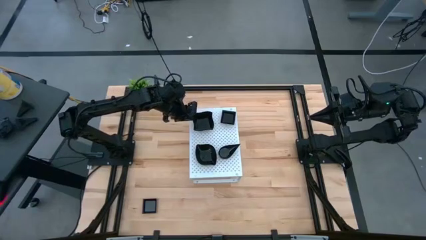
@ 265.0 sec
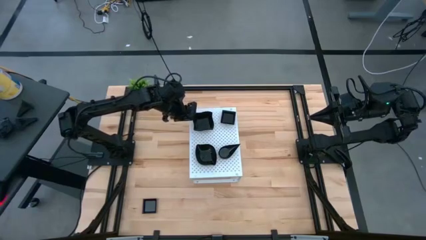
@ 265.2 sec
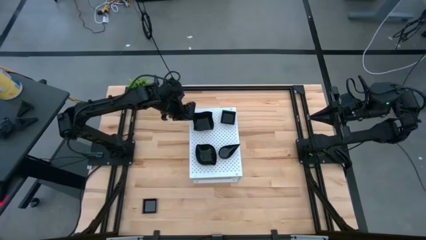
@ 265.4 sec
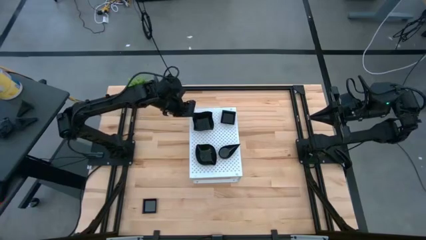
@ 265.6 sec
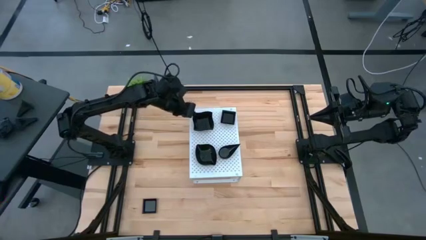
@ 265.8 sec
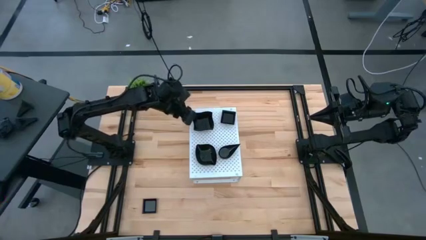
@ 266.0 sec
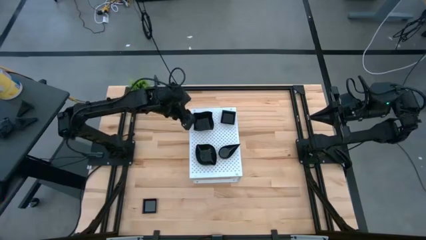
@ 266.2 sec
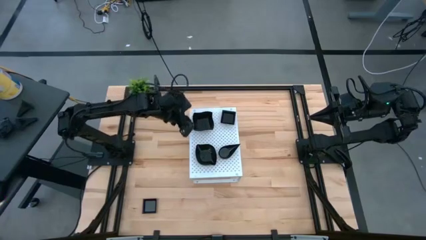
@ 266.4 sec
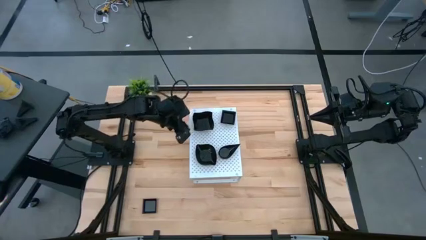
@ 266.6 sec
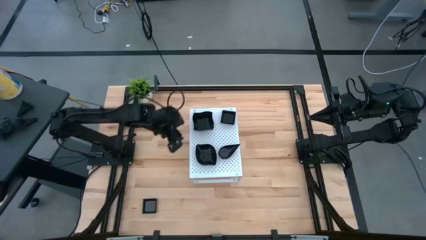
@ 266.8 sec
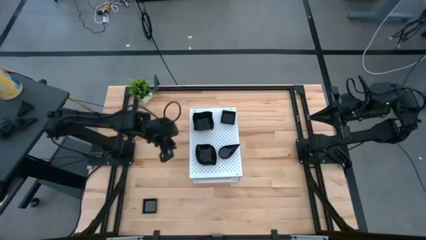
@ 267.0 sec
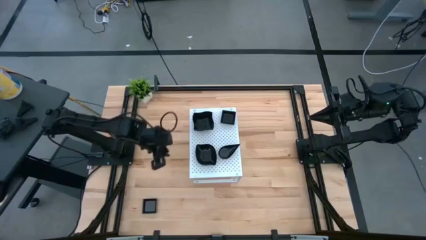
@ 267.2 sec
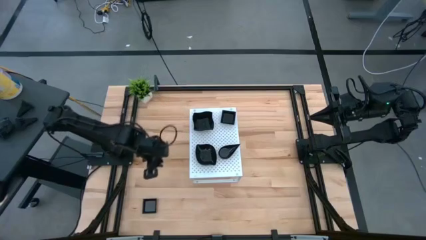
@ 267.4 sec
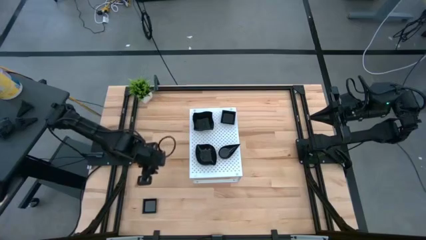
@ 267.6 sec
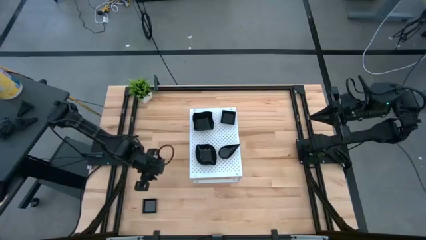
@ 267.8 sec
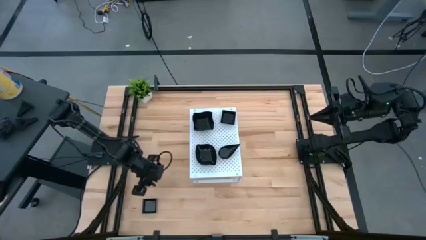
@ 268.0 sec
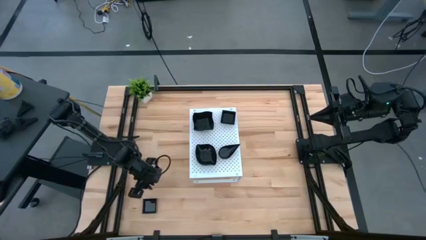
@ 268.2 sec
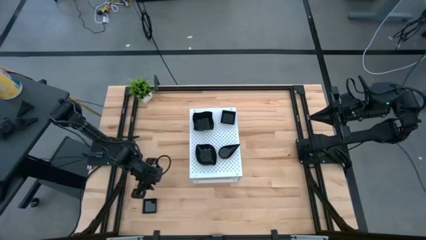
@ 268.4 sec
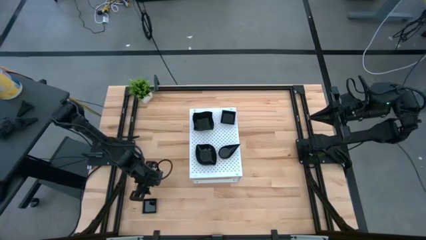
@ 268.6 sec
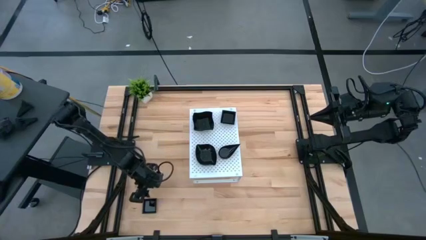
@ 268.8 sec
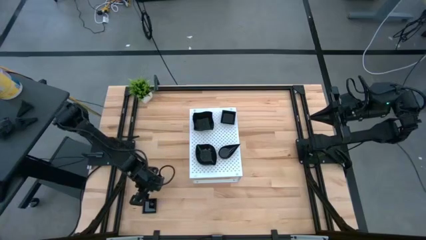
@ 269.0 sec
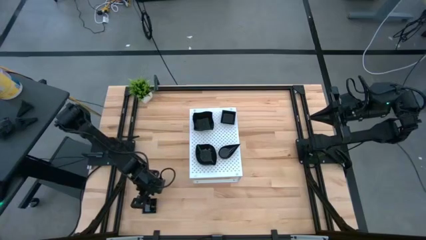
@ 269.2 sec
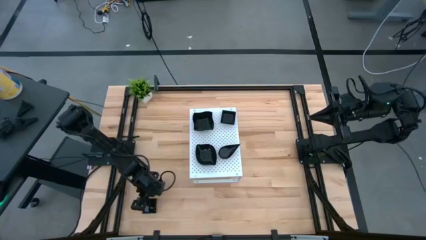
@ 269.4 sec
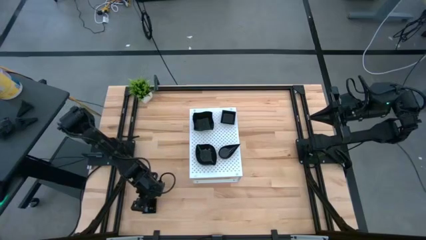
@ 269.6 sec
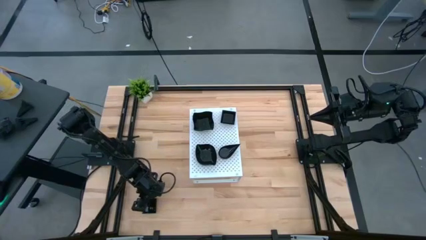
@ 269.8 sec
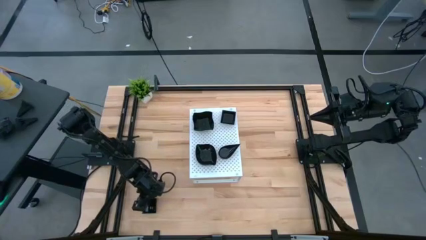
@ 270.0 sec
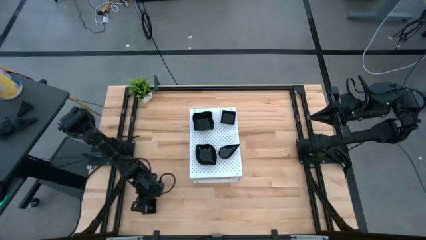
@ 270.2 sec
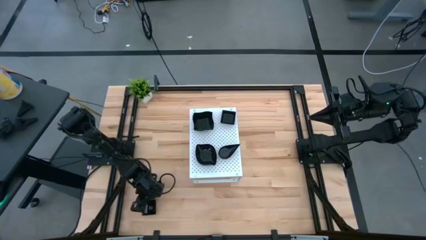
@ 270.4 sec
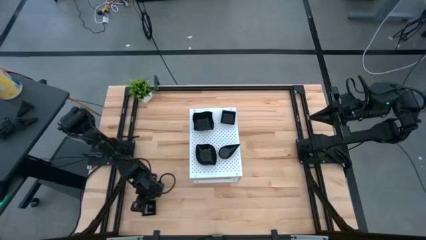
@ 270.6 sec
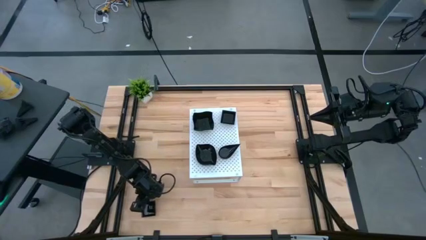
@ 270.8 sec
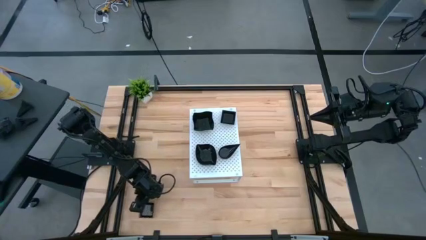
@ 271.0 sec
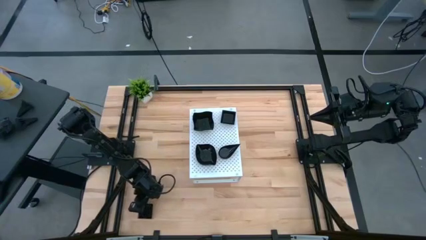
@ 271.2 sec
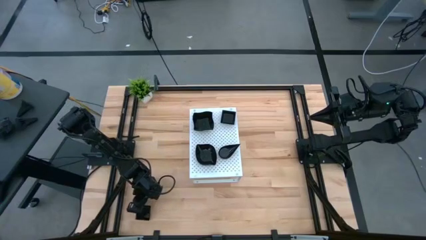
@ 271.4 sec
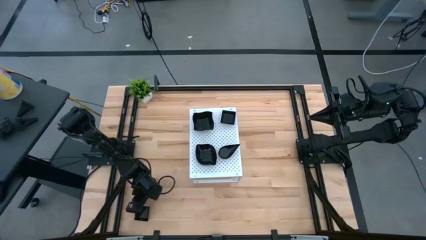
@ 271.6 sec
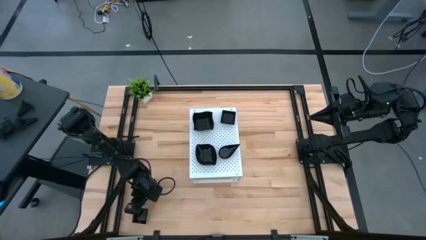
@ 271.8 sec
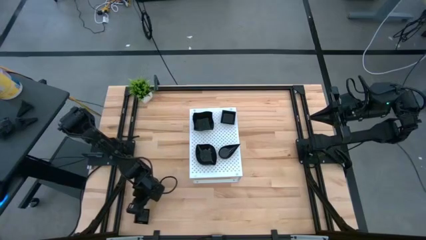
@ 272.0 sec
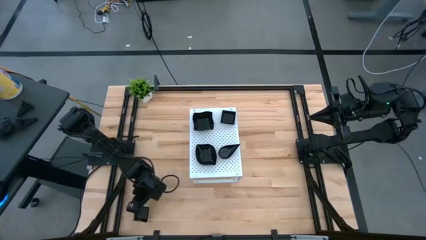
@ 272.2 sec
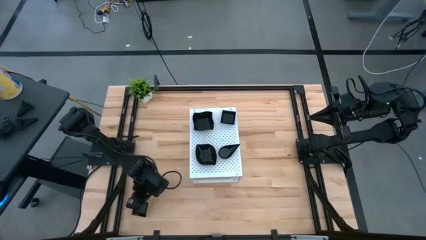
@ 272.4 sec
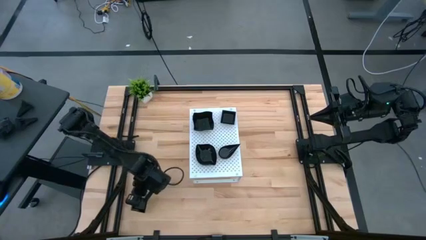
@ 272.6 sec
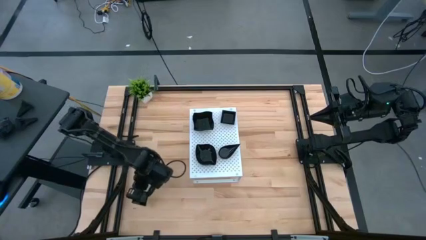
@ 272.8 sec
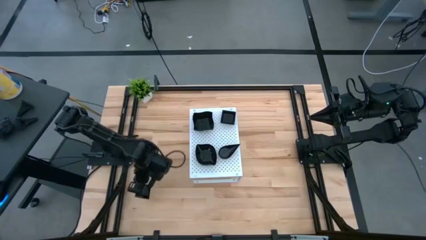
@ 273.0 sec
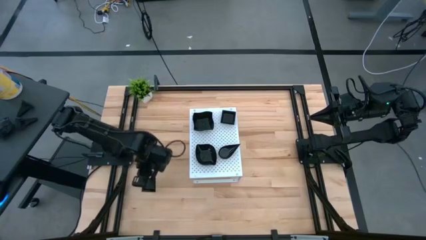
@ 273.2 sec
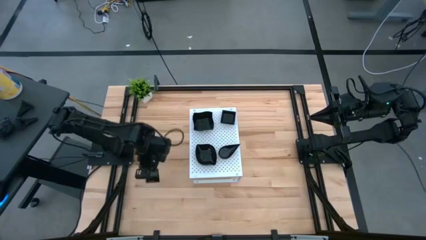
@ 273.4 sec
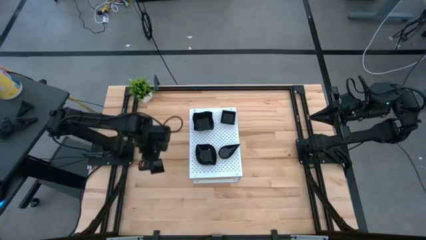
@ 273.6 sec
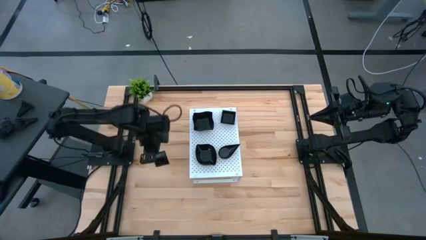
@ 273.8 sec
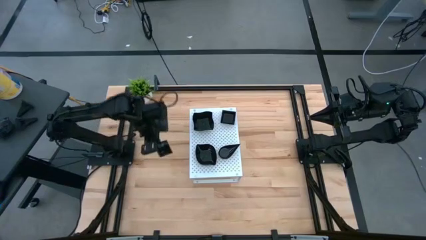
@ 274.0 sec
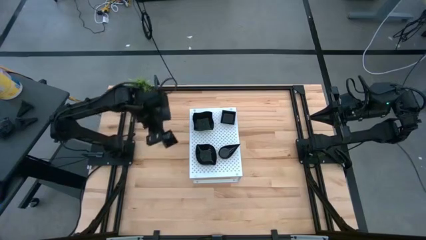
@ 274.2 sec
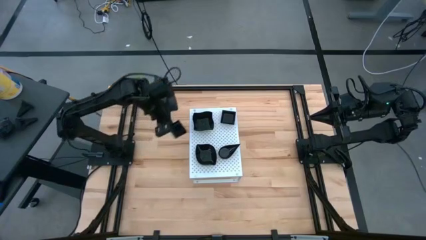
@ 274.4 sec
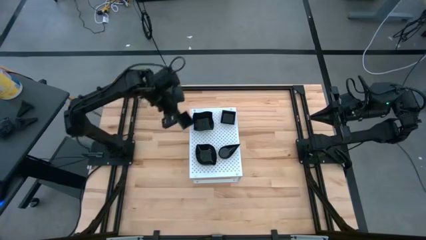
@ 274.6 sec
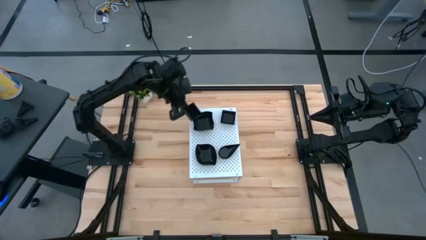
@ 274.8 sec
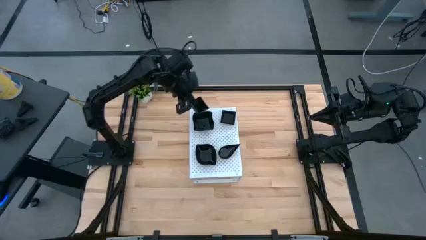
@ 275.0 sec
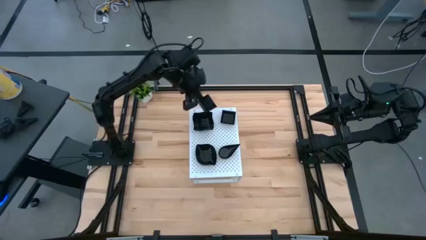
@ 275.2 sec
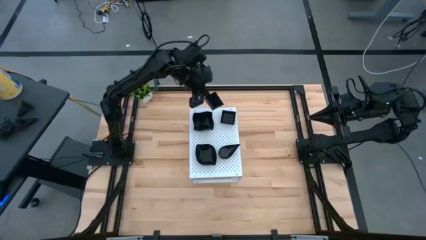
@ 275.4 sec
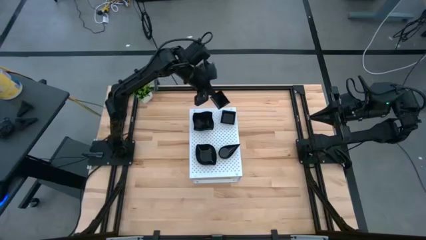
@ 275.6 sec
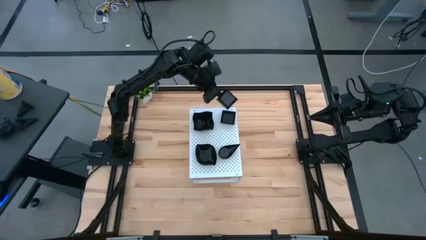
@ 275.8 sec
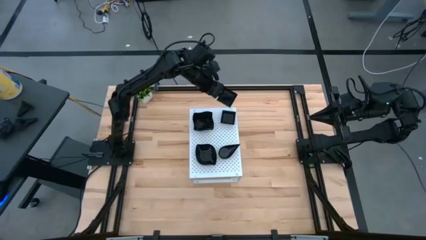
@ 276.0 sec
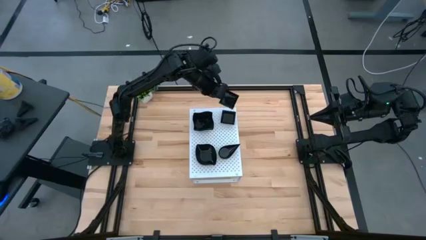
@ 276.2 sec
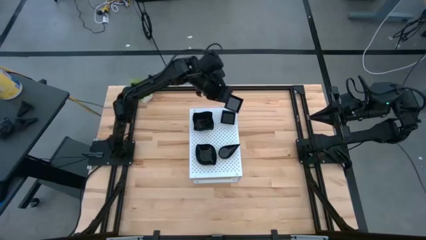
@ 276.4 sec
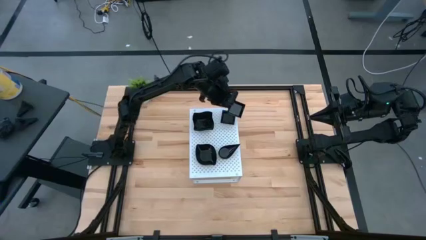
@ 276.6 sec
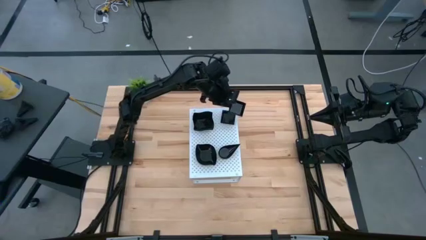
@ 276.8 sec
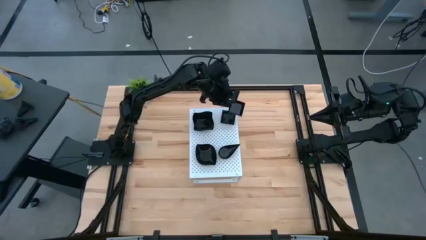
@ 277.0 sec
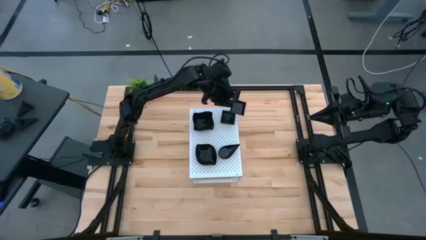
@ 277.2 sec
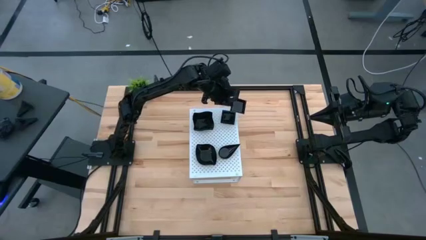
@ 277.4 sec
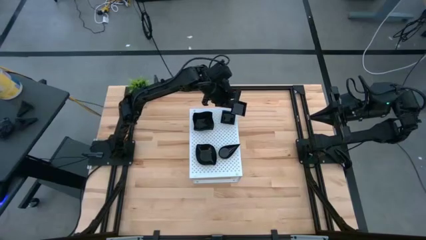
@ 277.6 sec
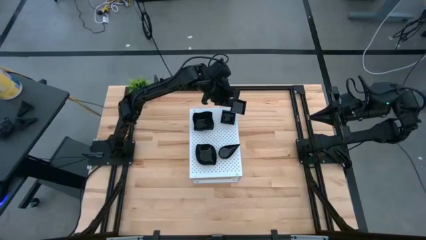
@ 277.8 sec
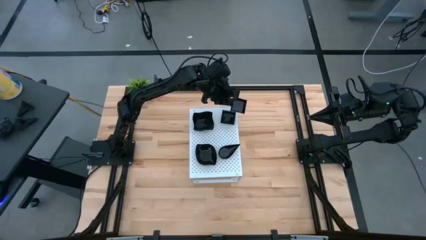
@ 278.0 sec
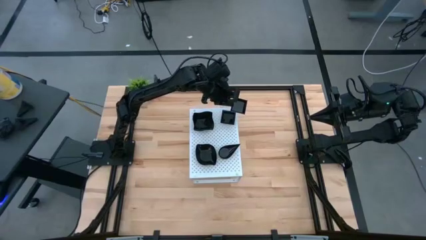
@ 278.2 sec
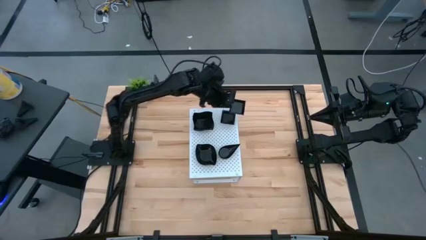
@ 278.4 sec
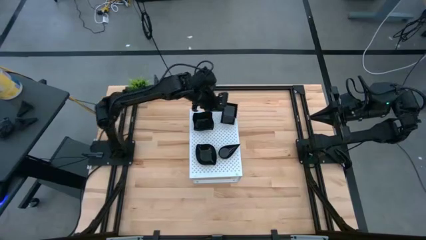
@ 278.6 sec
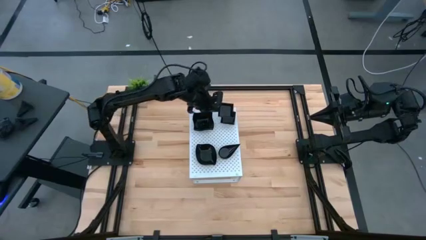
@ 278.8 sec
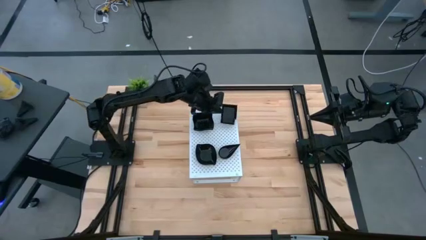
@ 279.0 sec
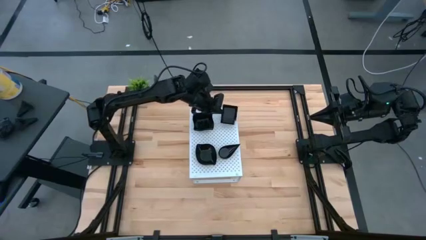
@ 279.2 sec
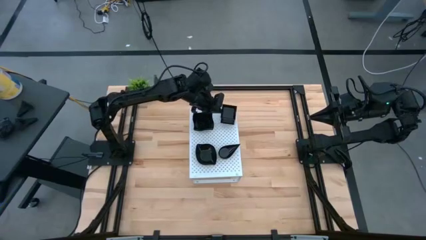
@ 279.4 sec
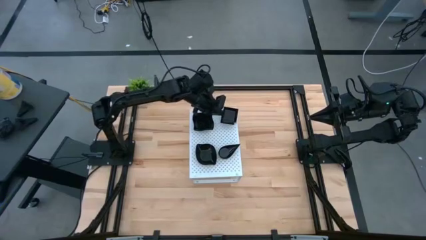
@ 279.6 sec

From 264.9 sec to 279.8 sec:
Task: Pick & Place Mini shaped plates
Stack the black square plate on top of the other black square plate on the shelf
